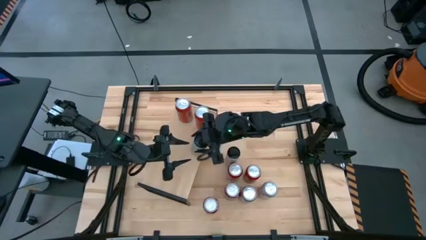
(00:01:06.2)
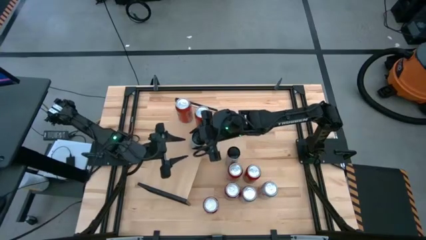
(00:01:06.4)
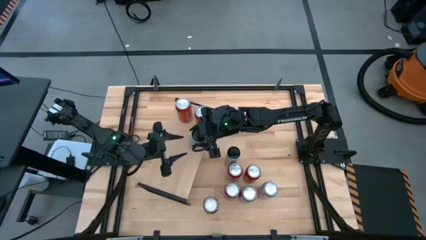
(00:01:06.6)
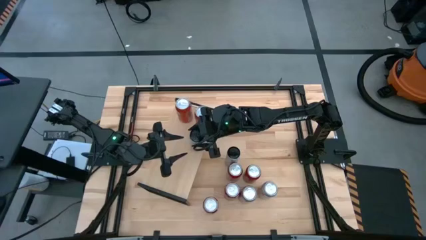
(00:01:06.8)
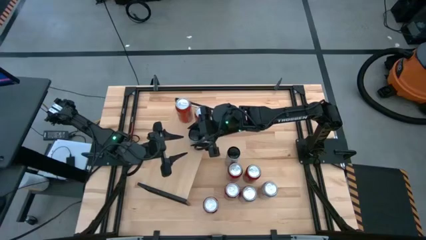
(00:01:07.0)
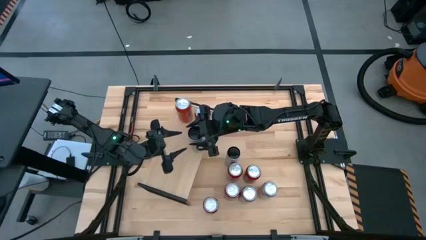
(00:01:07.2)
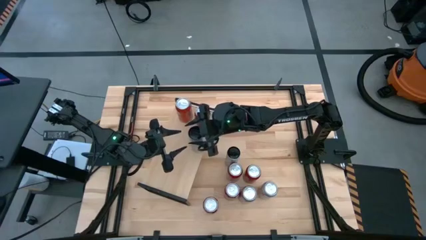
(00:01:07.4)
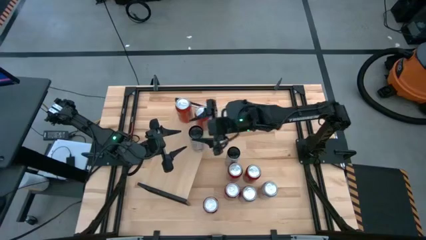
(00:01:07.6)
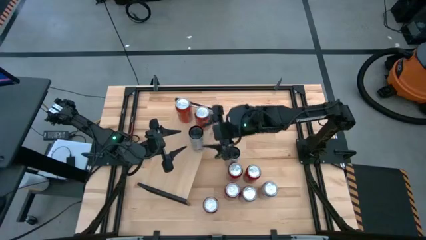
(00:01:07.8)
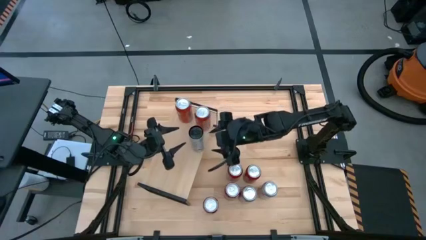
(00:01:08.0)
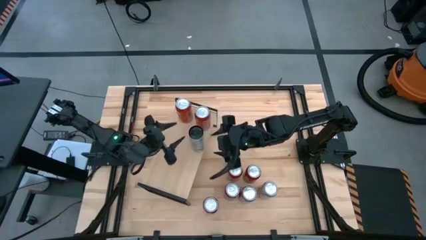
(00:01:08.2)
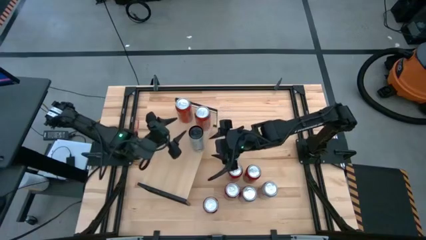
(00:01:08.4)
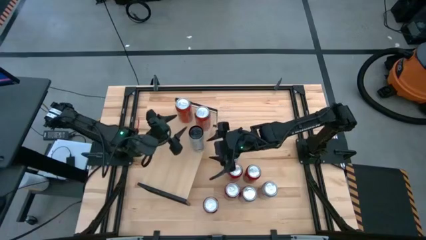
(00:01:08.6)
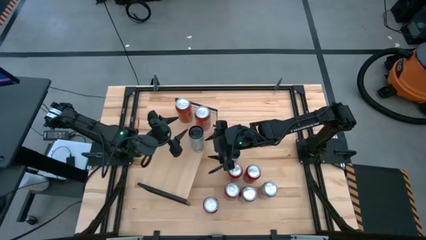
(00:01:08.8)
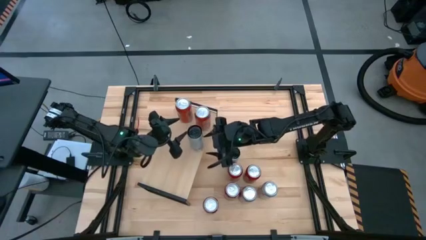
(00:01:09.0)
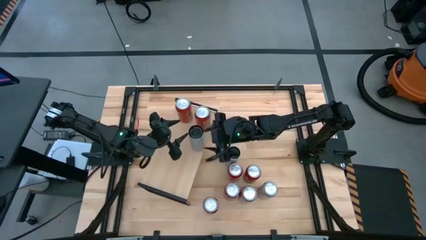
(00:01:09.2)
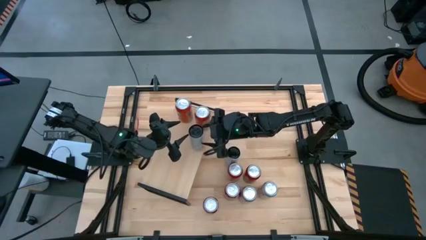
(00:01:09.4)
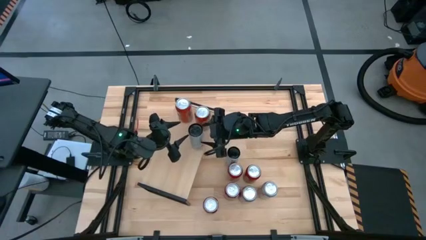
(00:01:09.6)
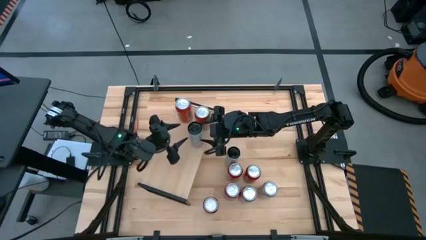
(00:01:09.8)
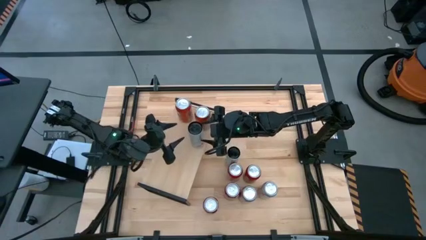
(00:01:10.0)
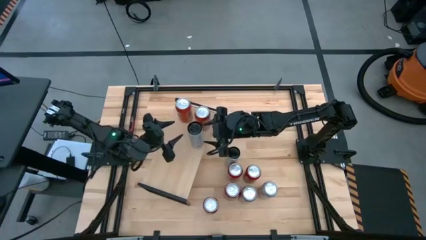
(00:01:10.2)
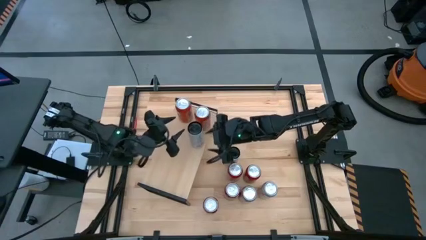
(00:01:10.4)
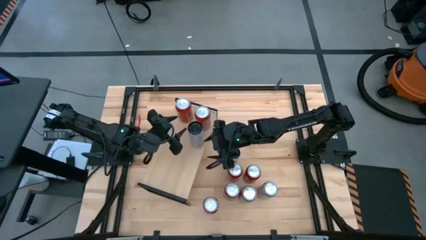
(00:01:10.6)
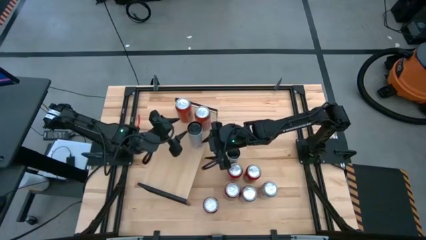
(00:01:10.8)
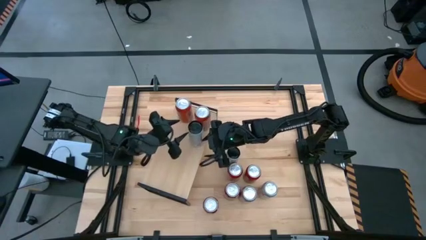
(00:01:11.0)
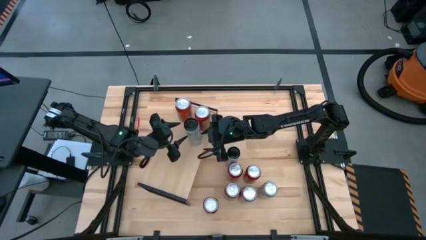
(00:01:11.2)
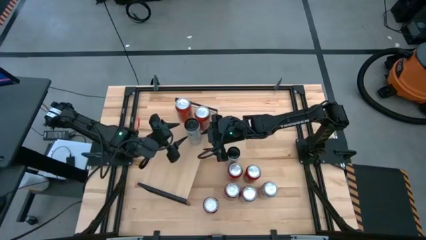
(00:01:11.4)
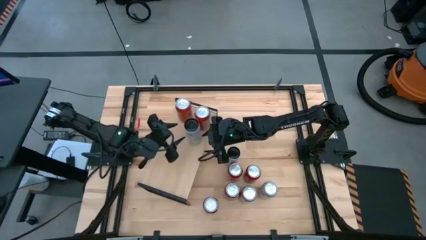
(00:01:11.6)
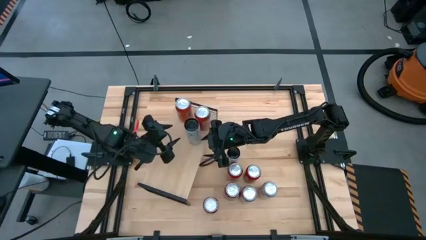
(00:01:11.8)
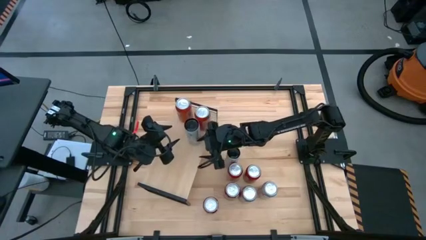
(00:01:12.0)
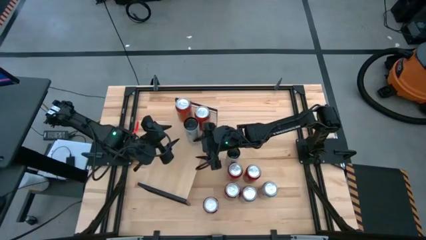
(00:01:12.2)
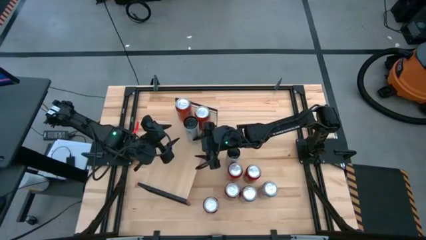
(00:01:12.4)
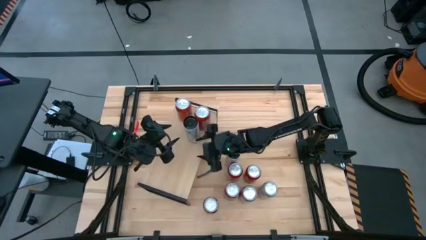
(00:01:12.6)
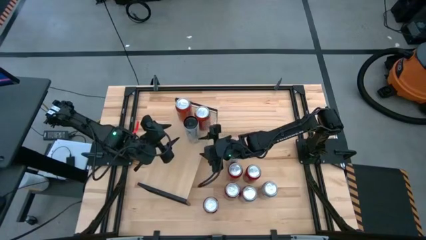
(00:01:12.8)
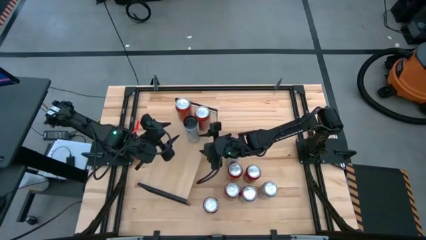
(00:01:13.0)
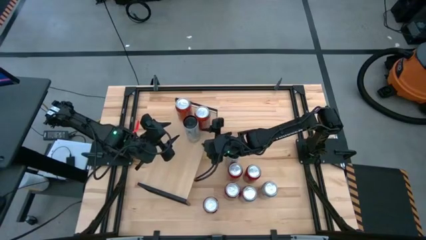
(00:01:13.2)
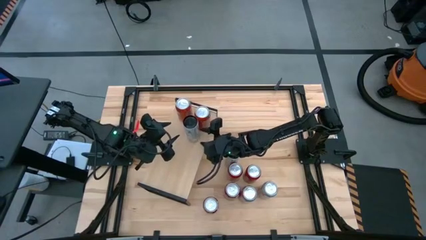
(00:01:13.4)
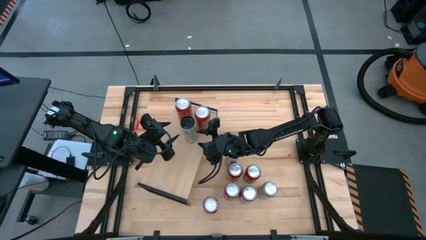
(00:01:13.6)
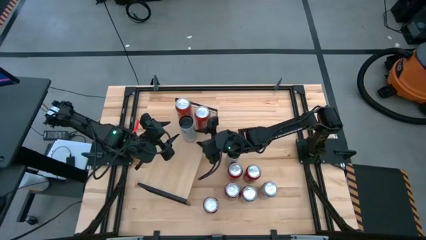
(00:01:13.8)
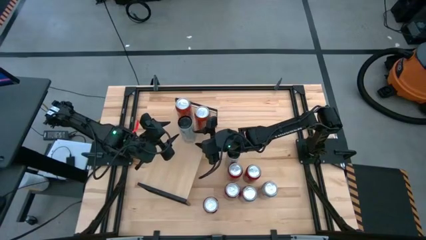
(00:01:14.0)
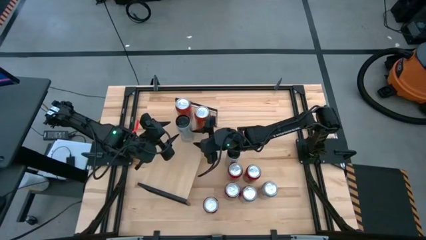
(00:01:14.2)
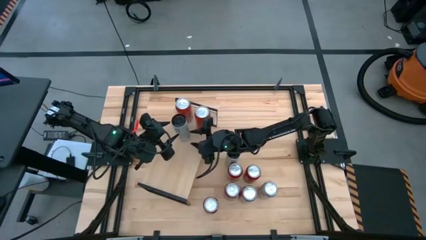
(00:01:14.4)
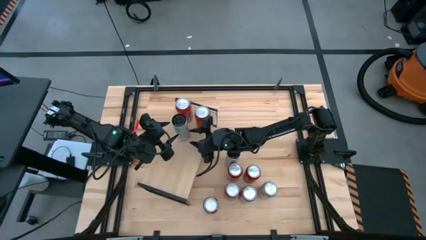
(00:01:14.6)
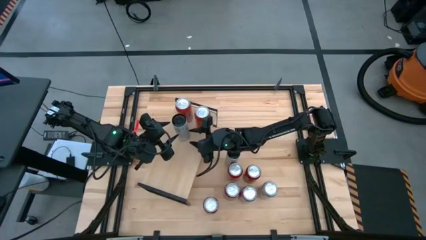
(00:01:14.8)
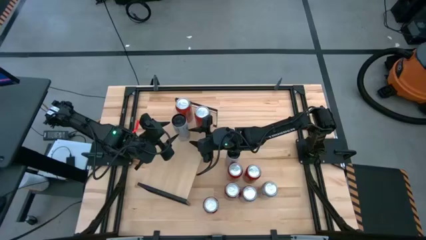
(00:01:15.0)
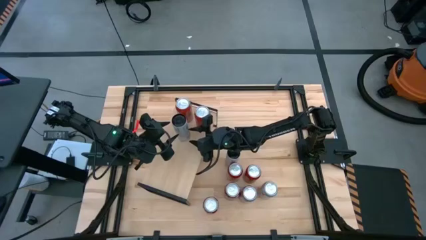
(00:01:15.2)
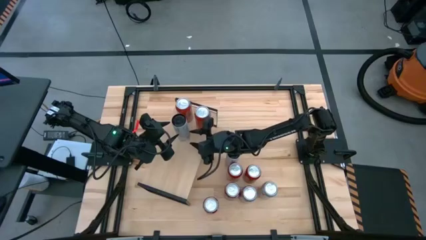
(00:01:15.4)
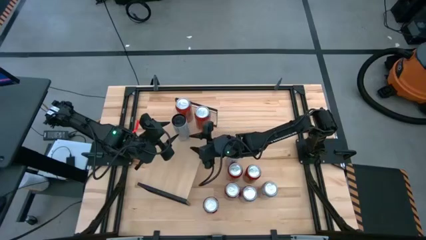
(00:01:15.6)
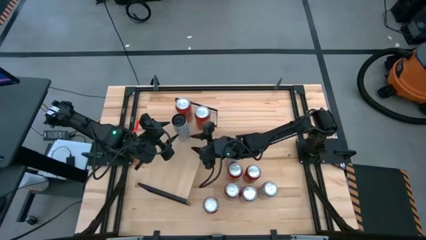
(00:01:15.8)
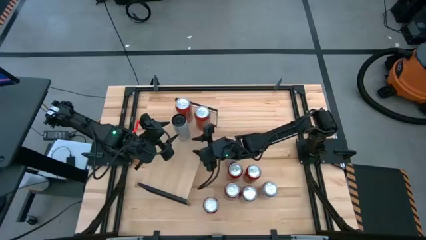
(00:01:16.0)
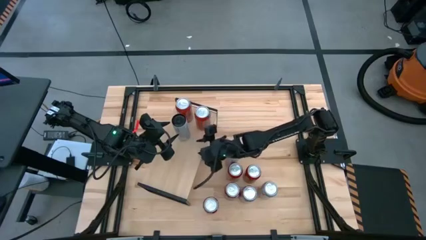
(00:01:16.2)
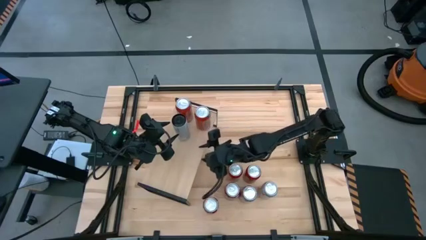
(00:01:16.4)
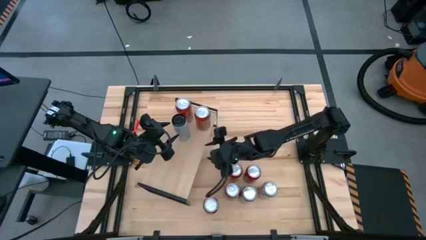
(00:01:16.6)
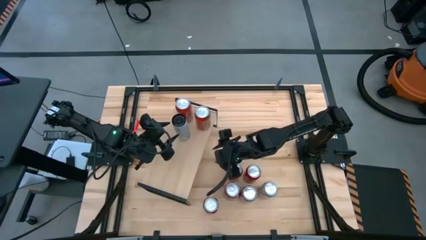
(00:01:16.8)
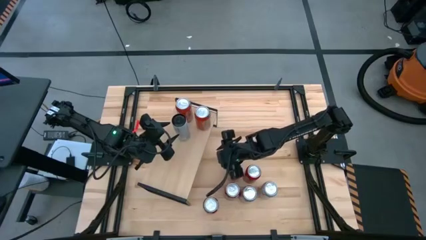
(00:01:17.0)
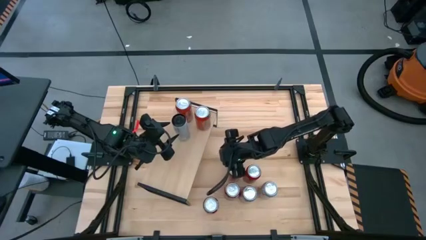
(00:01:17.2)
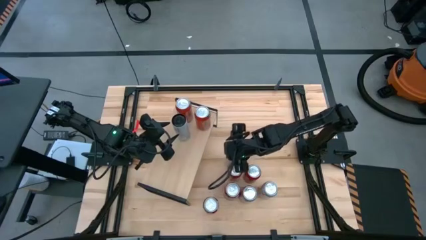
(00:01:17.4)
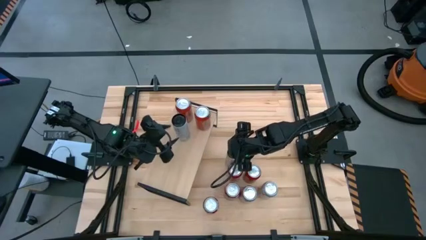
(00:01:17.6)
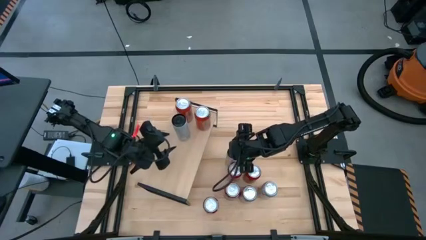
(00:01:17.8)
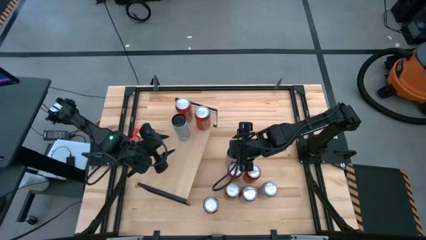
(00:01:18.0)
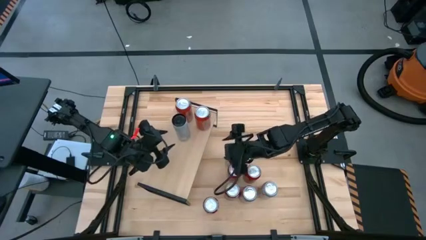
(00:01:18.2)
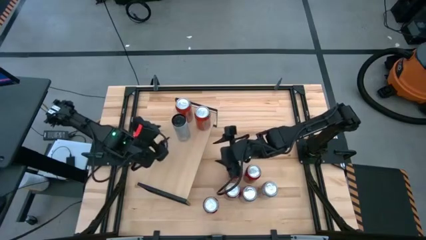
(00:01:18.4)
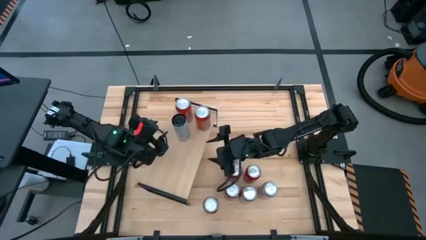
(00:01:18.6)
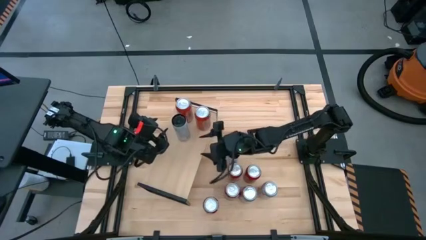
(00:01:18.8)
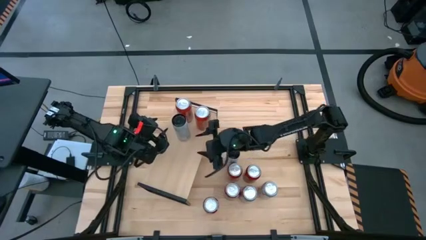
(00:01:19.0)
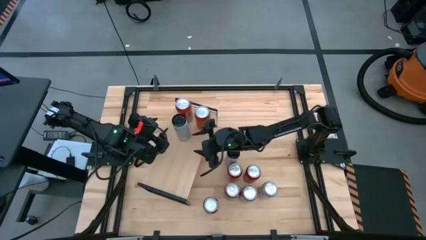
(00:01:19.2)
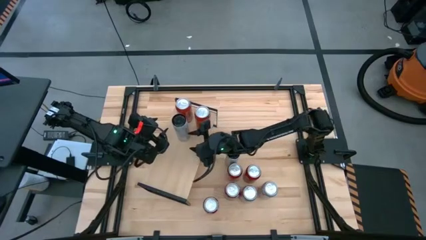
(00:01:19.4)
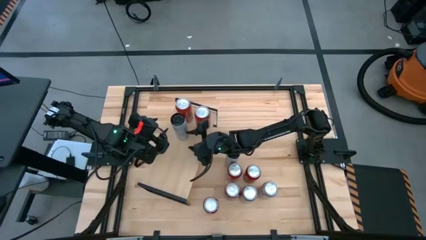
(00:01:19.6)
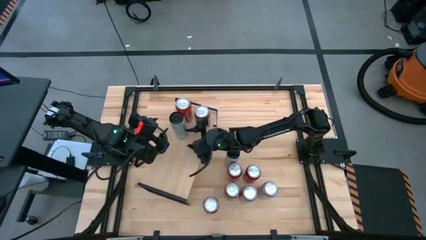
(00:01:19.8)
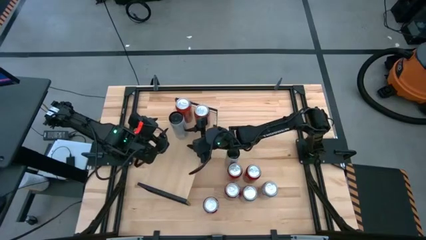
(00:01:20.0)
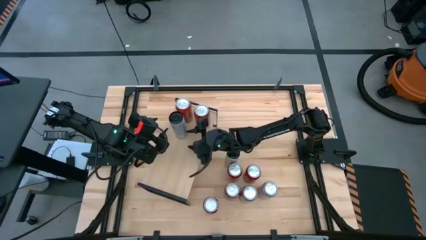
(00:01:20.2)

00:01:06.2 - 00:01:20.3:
Task: Place canned beverage on shelf
Put the top white soda can on the shelf

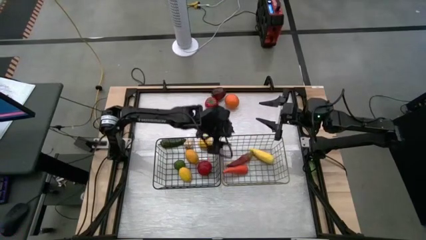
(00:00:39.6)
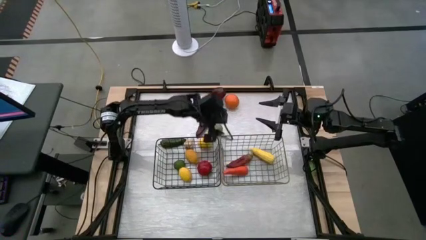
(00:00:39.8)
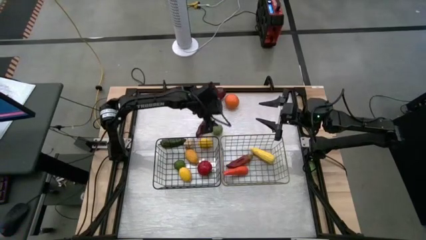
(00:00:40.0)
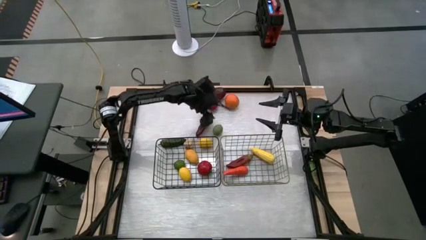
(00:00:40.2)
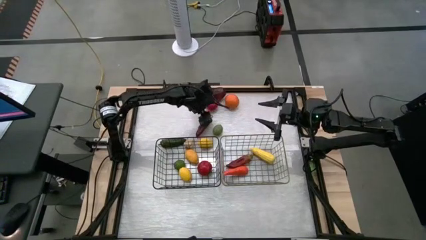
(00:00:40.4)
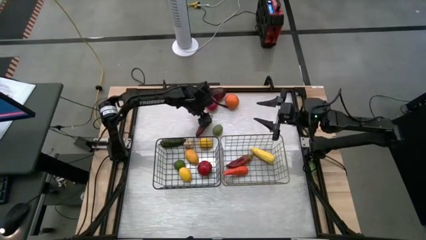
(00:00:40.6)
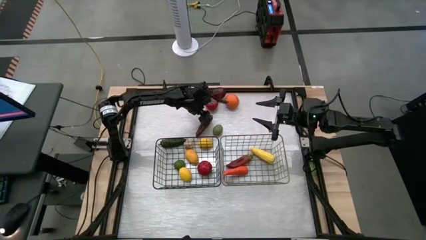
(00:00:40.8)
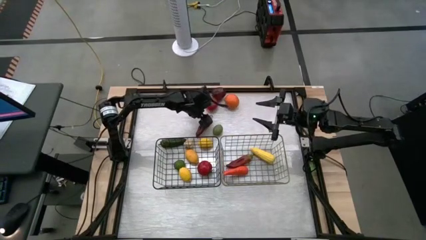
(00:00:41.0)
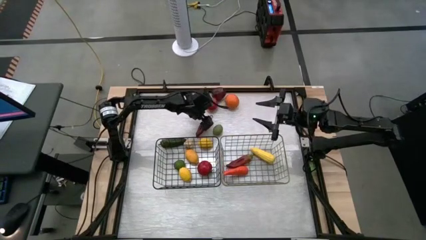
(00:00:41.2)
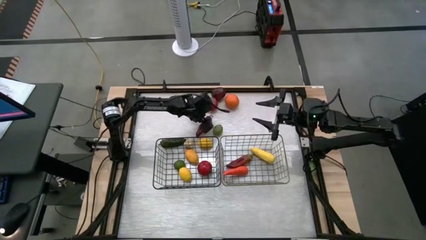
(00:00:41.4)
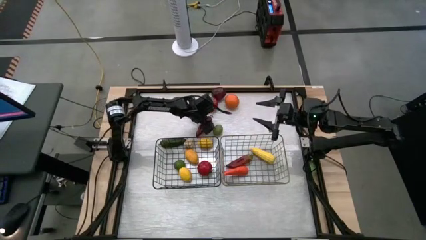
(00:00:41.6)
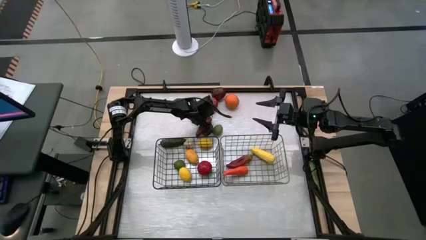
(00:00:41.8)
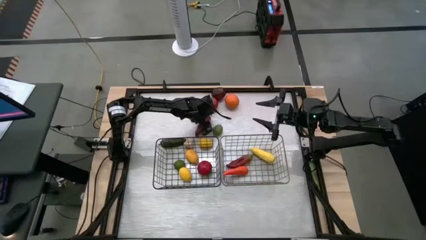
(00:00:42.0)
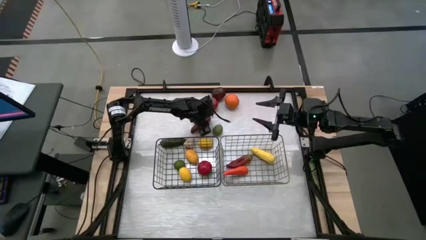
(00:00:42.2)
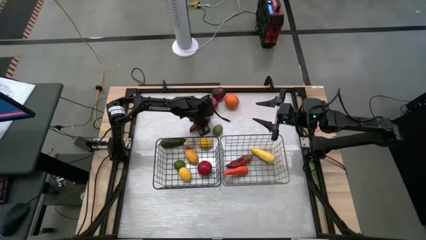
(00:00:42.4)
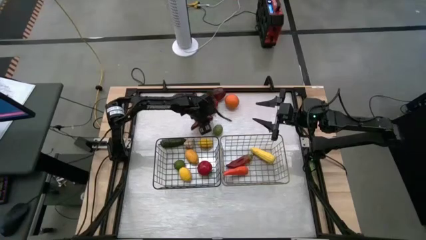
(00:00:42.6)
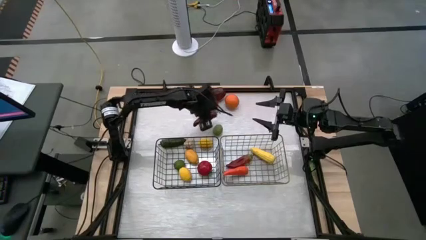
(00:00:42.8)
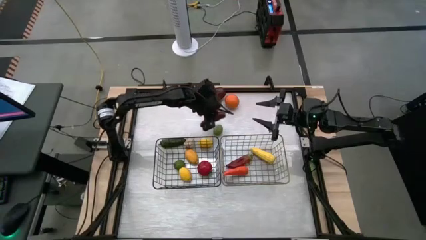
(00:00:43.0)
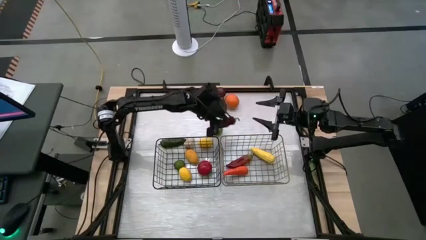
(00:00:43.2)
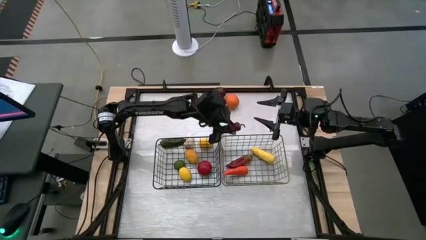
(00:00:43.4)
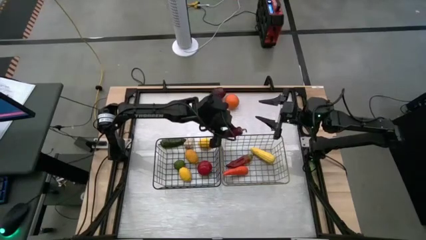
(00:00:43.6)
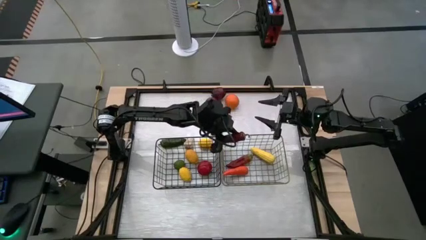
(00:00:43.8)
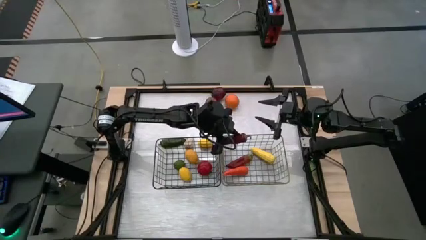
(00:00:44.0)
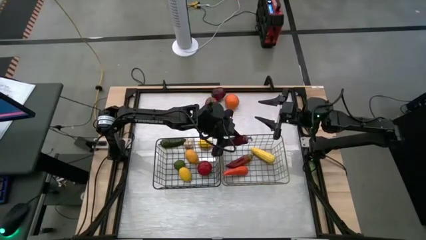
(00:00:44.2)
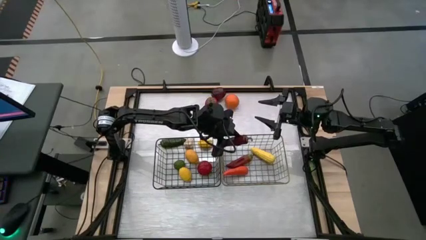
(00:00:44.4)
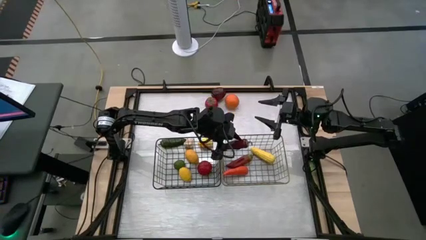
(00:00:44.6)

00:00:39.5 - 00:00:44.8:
Task: Sort produce into baskets
Put the red bell pepper into the gold wire basket
